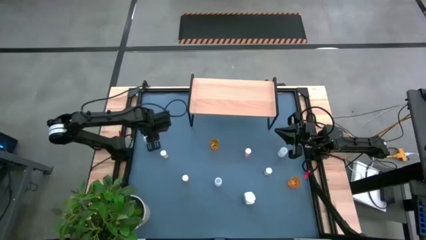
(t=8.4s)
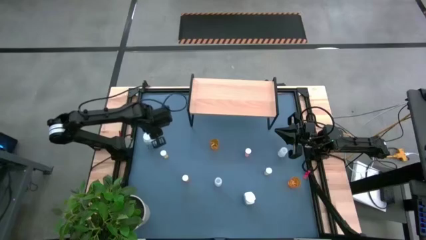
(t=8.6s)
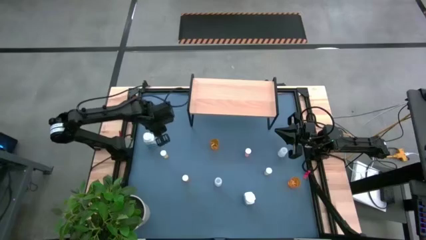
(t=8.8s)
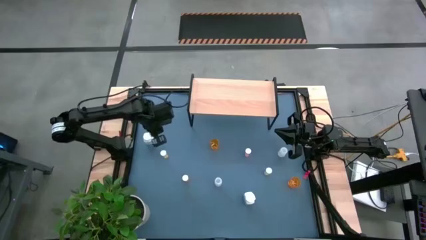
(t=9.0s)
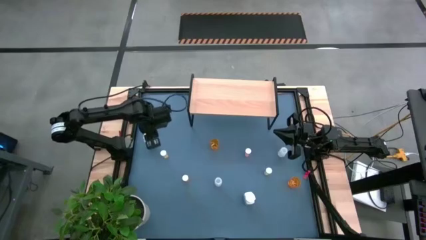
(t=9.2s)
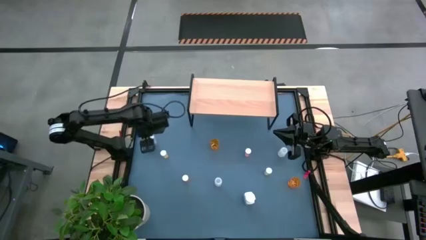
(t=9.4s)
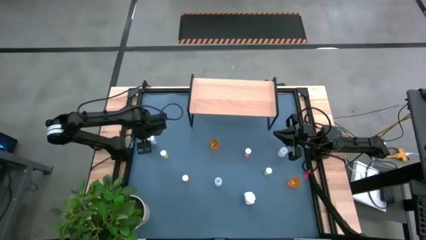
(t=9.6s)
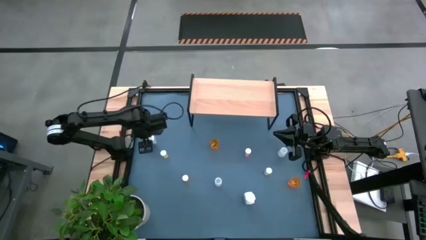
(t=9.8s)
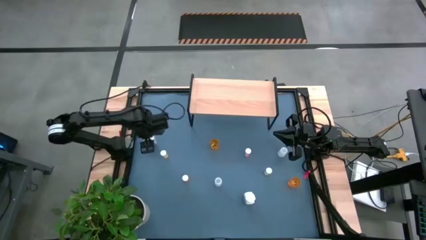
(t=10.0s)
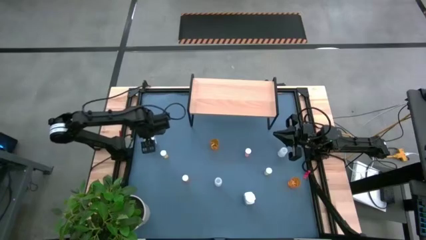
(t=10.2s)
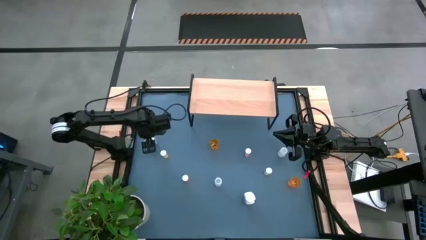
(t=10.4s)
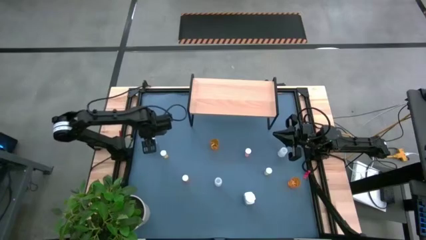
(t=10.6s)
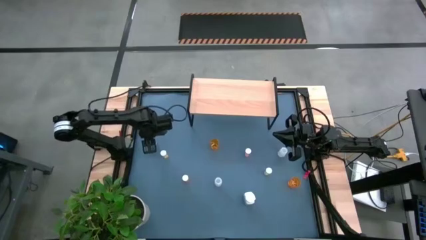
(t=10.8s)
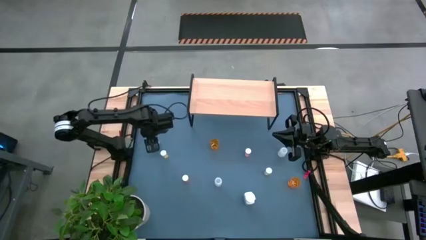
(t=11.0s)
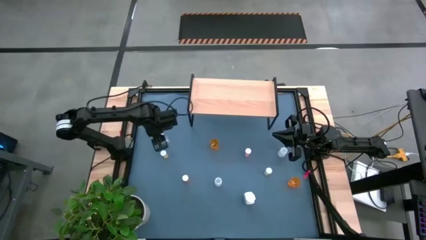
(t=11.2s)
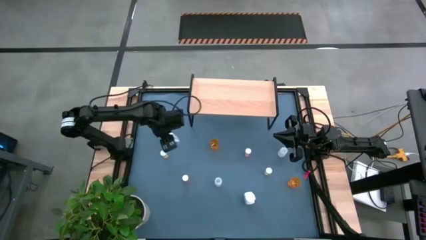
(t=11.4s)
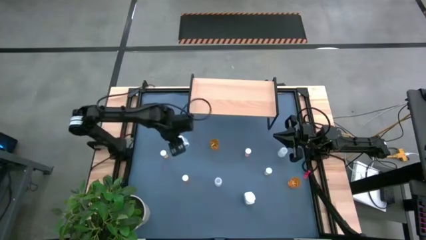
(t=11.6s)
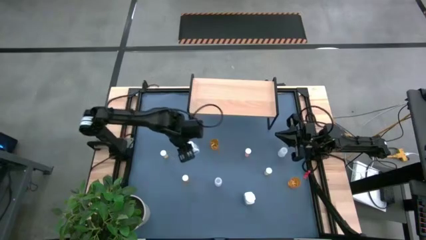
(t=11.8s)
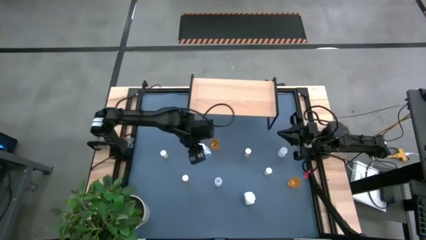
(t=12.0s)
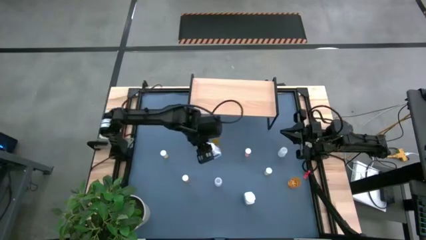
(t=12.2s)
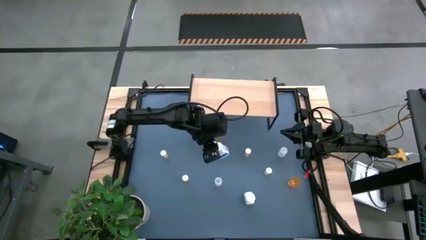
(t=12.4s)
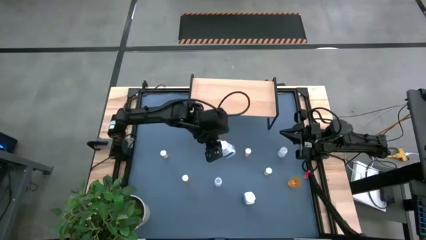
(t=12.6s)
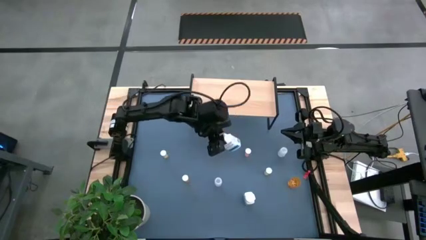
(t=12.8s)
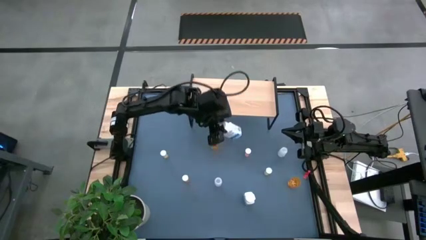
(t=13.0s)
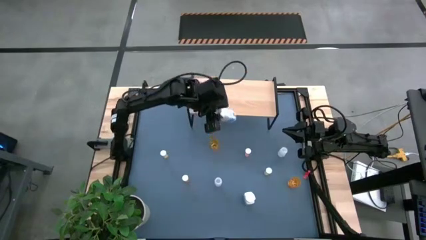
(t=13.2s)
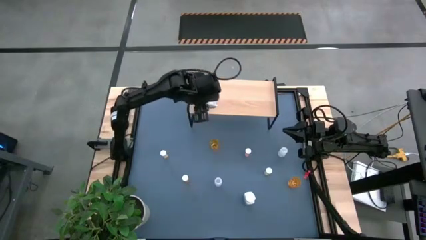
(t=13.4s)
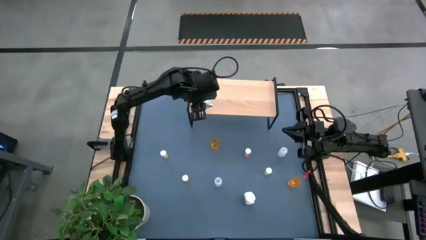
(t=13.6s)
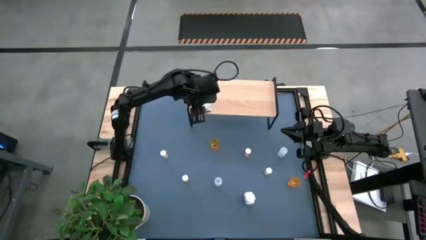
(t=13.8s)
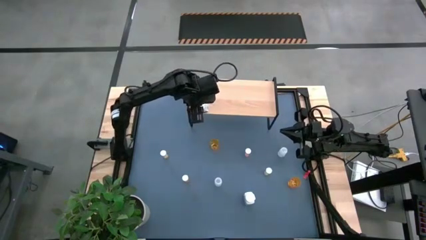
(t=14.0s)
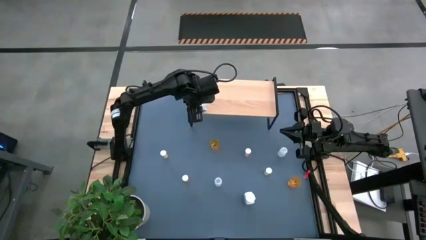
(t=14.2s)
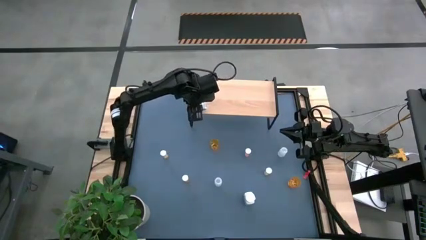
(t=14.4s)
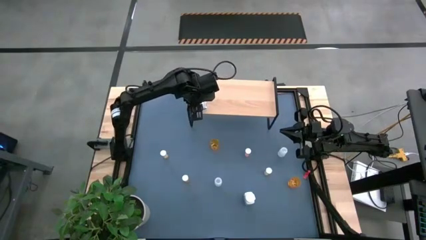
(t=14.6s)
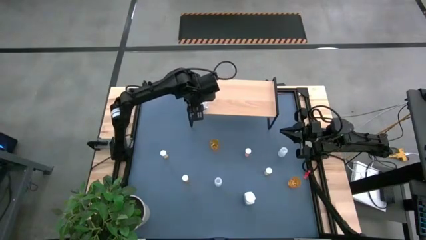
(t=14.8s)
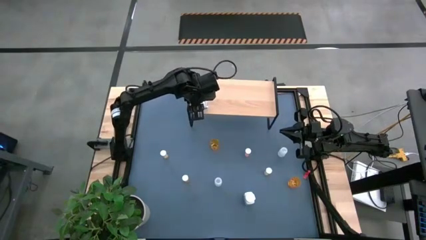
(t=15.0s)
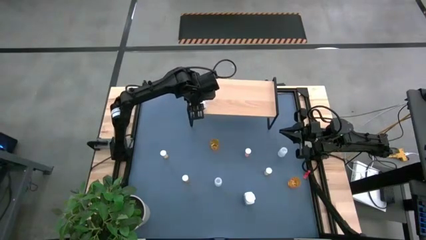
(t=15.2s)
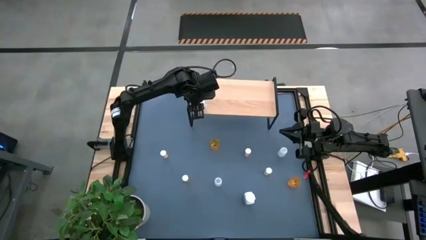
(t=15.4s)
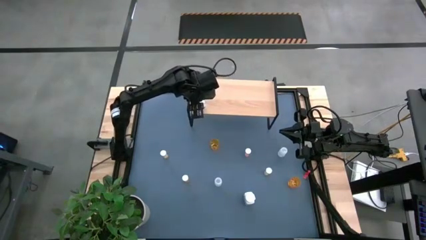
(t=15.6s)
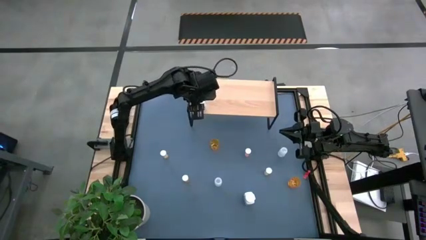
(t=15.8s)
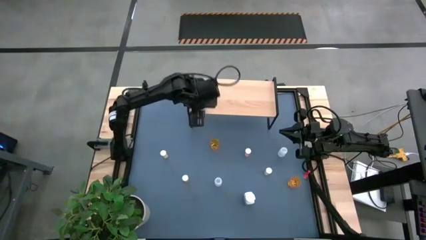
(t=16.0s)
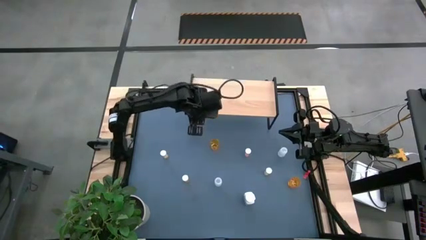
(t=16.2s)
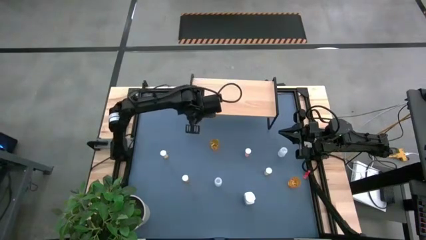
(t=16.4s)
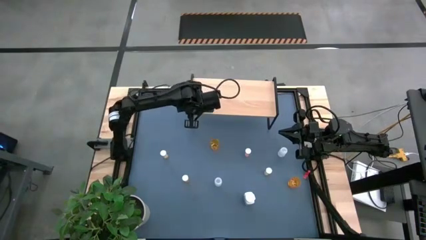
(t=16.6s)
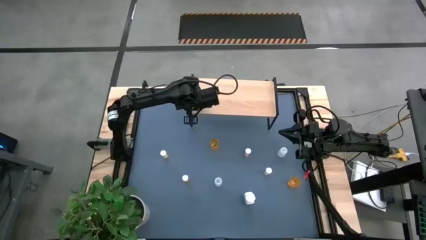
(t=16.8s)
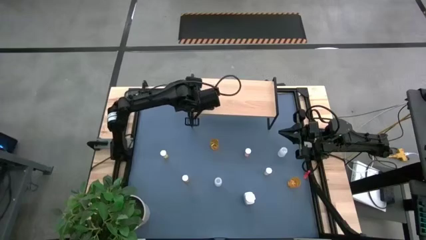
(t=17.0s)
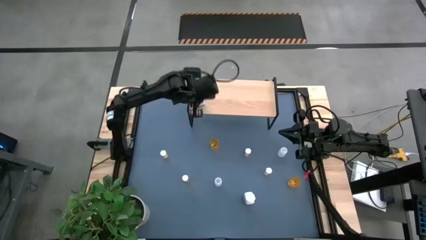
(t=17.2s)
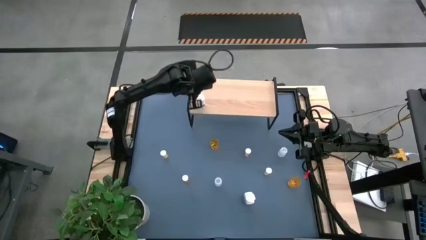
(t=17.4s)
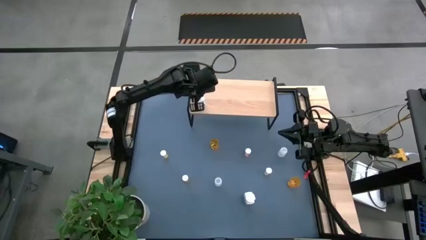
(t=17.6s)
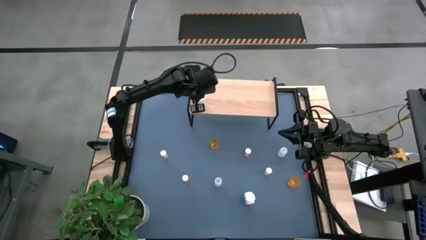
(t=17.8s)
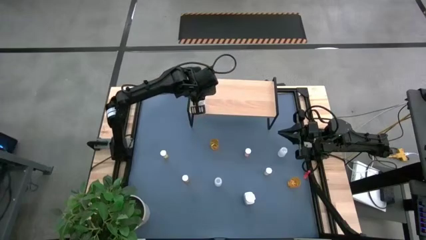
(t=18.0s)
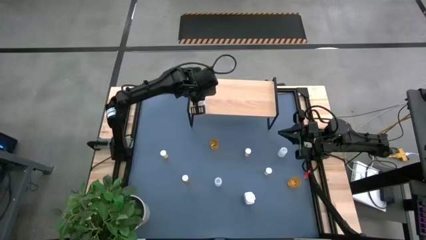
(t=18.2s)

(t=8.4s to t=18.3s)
Task: Pick and place medicine bottles onto shelf by color
Put the left white pill bottle on the shelf
